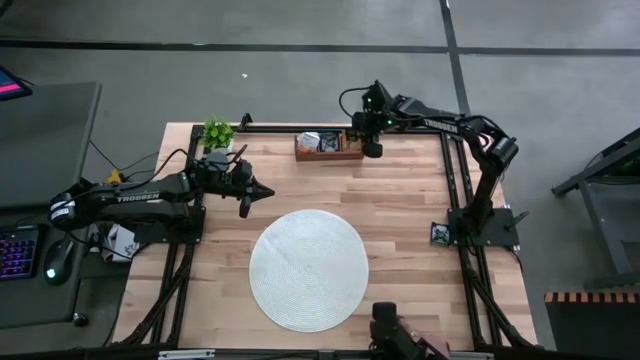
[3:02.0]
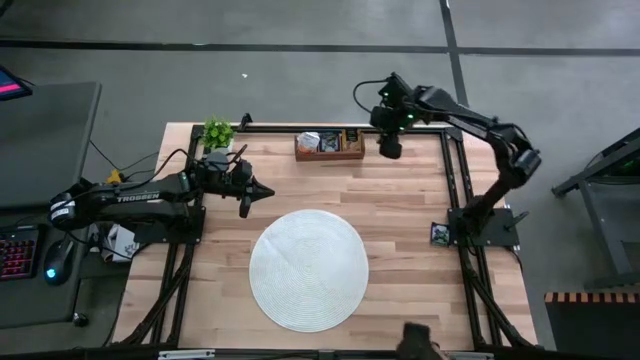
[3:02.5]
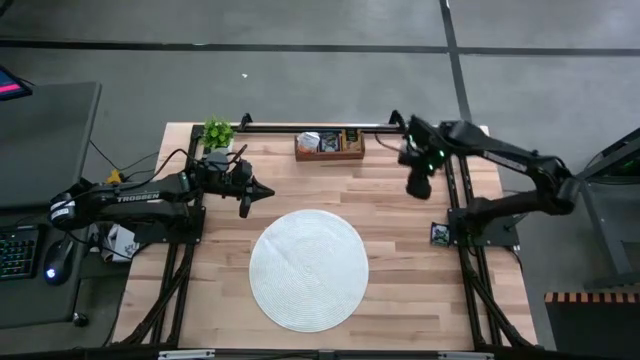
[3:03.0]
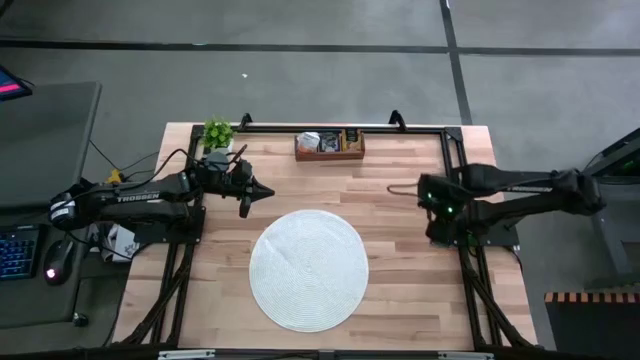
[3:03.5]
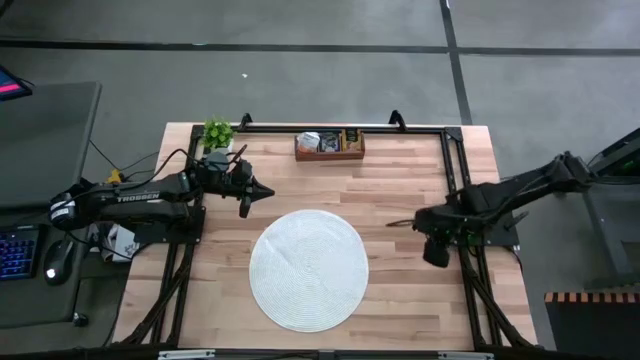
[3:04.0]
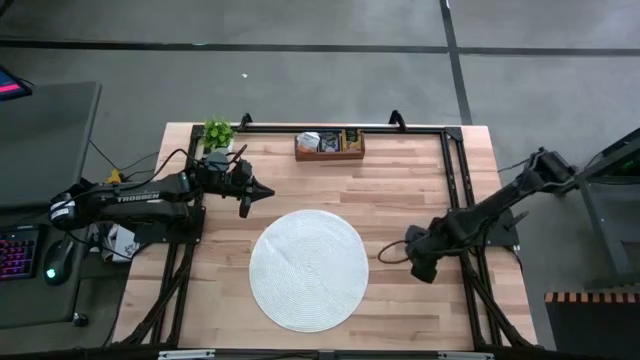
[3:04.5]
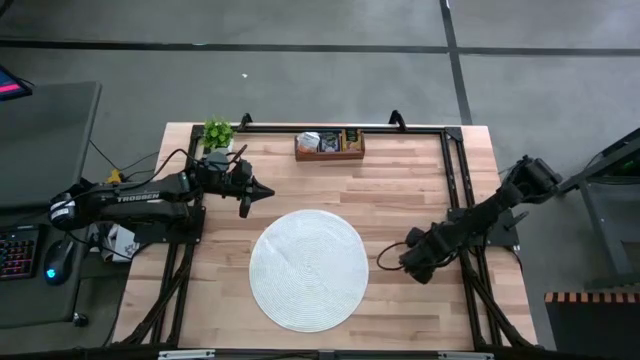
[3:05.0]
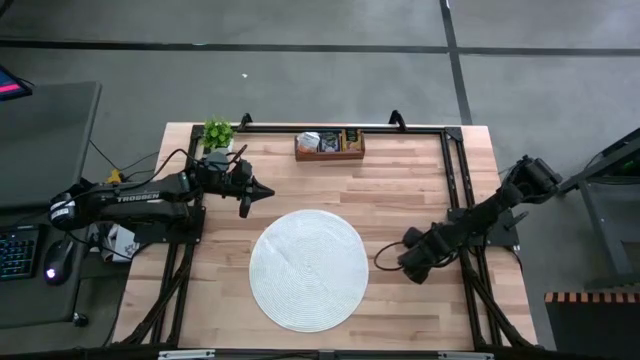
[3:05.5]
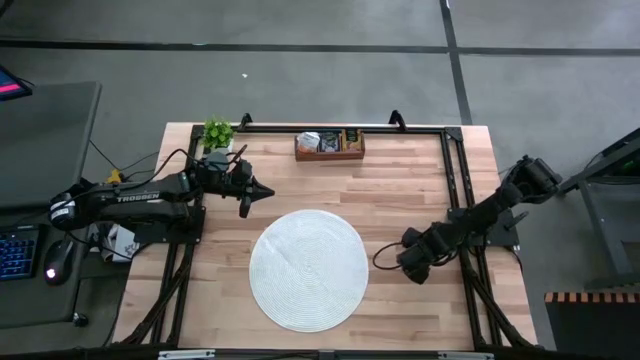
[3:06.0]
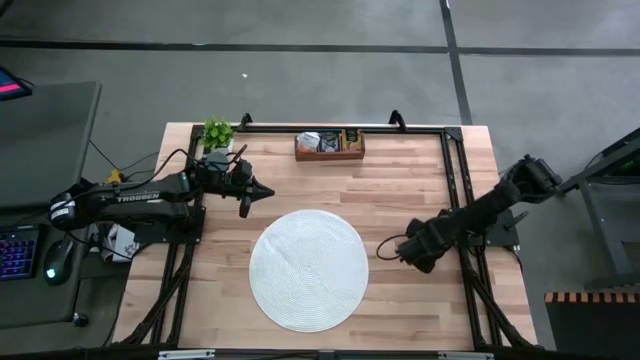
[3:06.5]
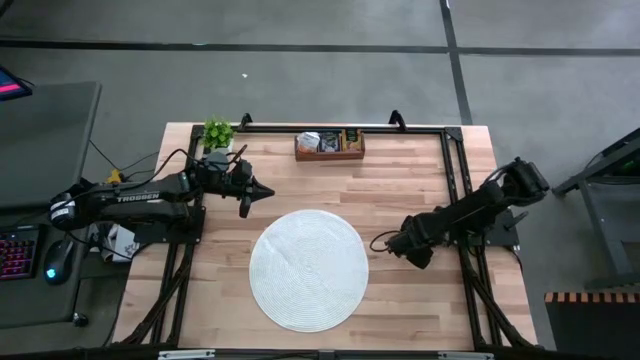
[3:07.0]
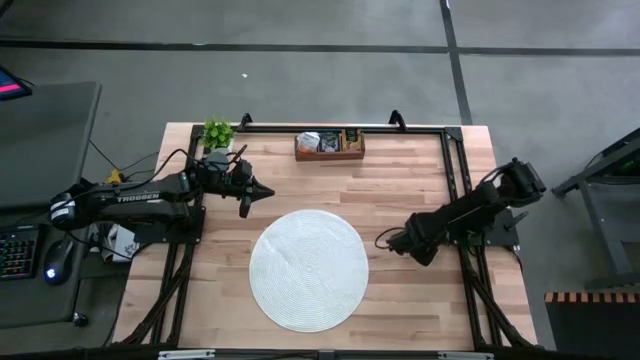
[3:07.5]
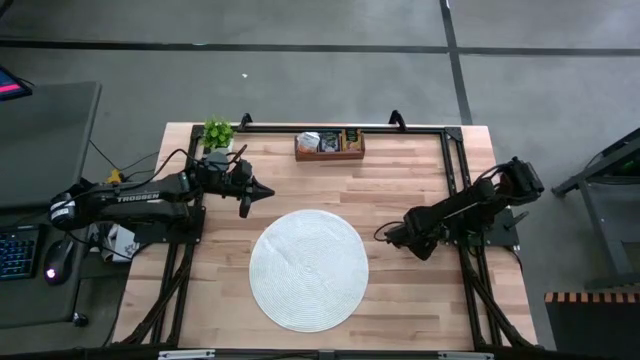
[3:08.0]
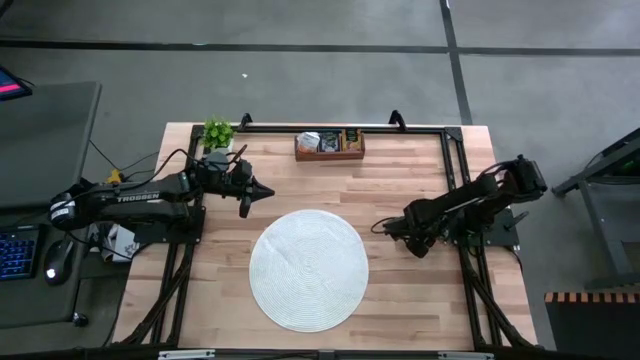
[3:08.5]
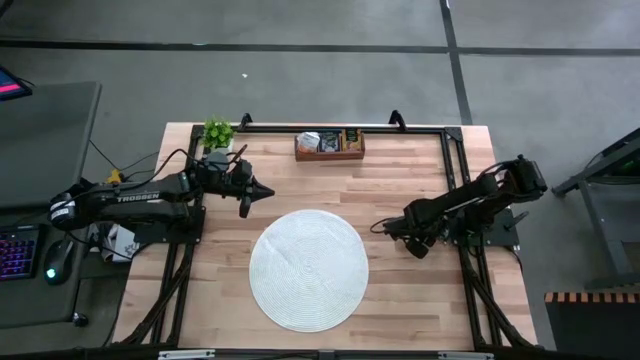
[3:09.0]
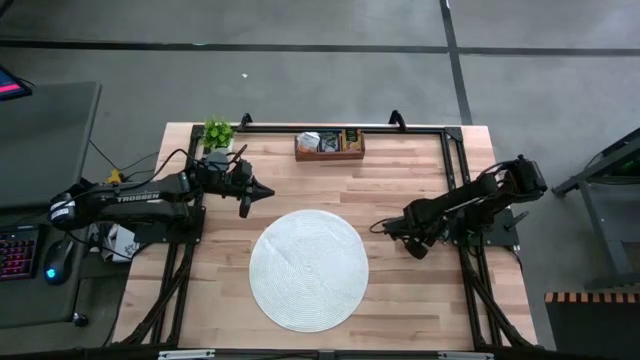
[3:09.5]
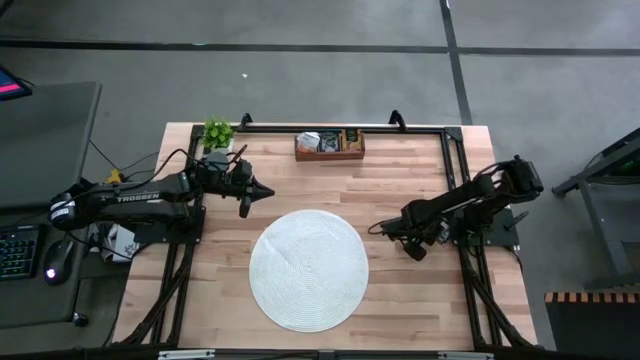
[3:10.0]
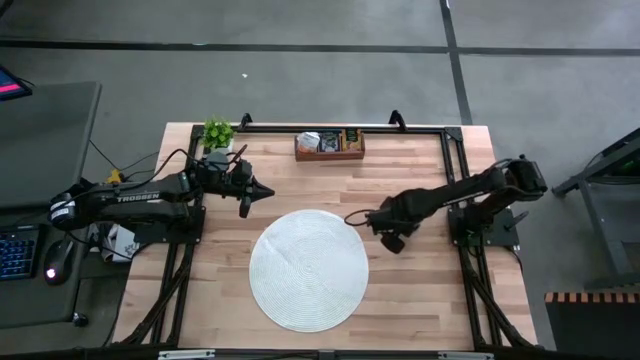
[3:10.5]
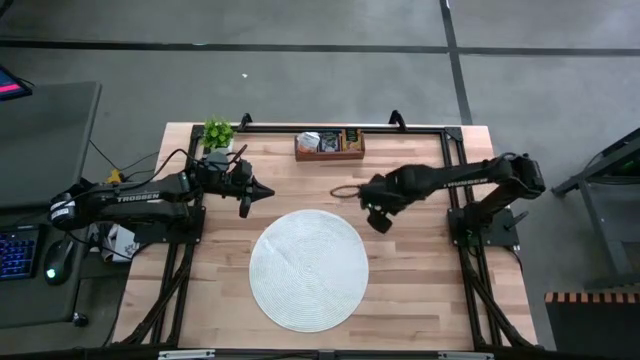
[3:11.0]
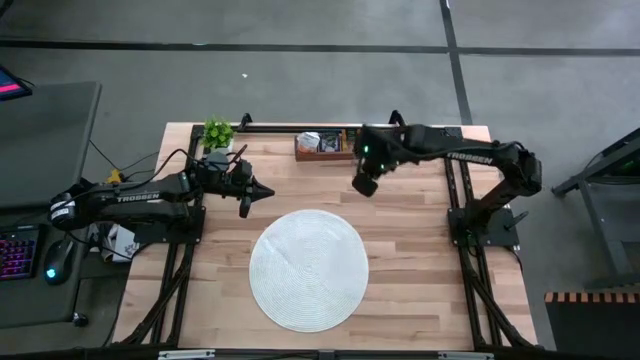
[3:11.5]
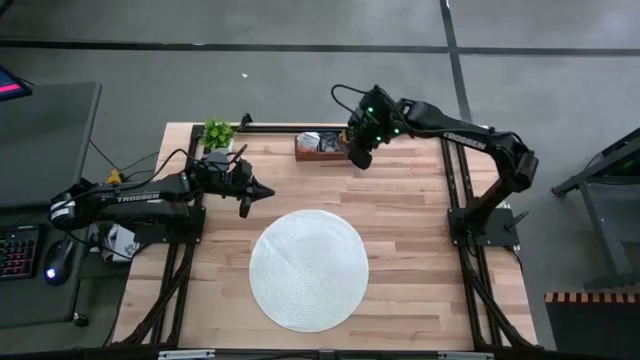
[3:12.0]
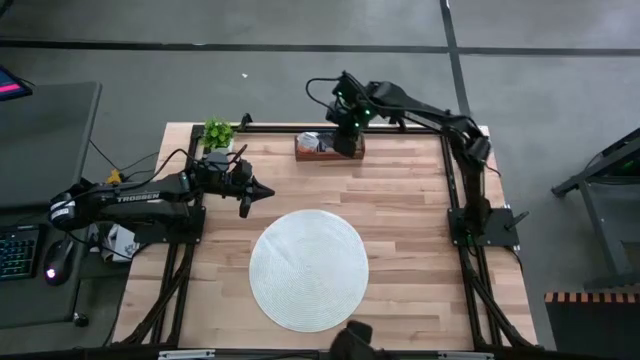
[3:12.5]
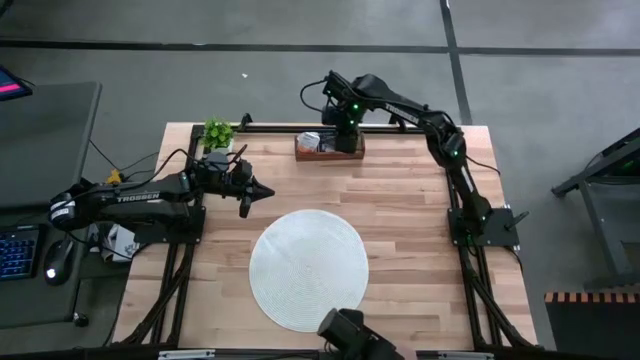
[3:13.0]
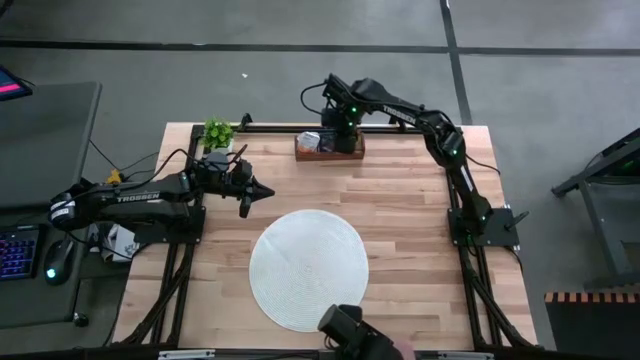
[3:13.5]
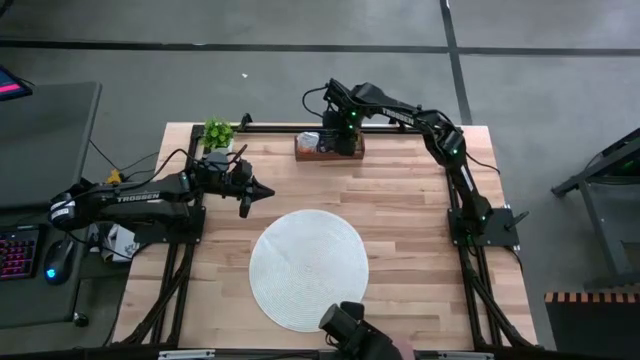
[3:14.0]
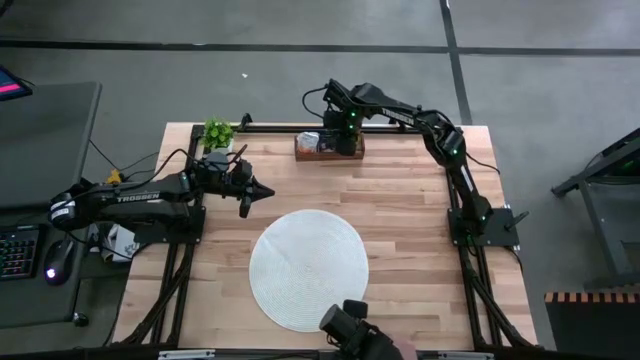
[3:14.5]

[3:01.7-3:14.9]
Task: Pick & Place Tea
Put the blue tea bag into the middle section of the wooden organizer

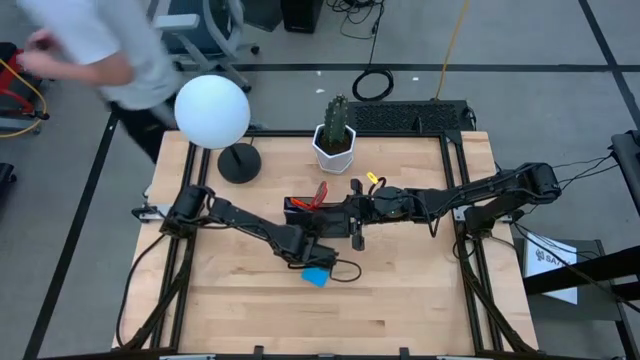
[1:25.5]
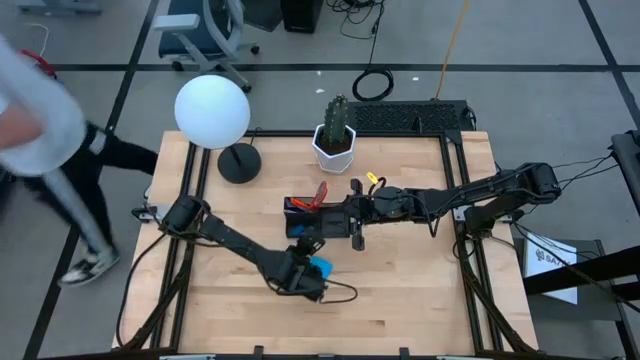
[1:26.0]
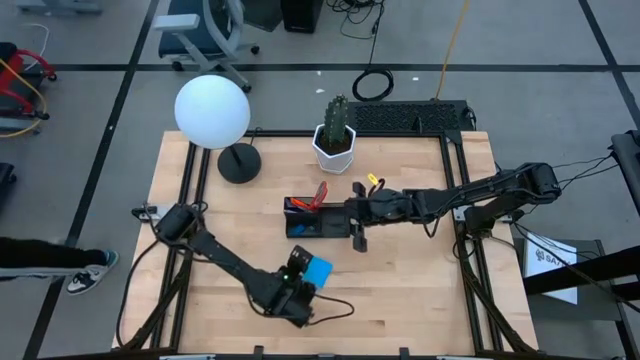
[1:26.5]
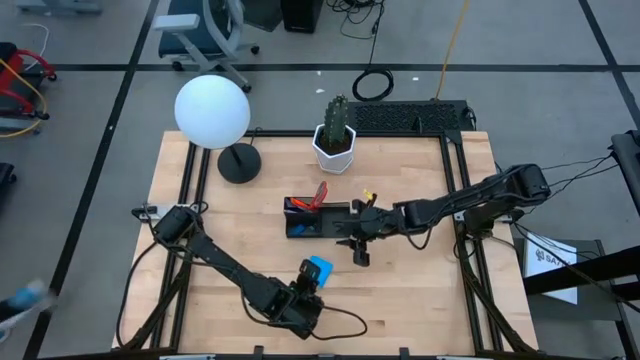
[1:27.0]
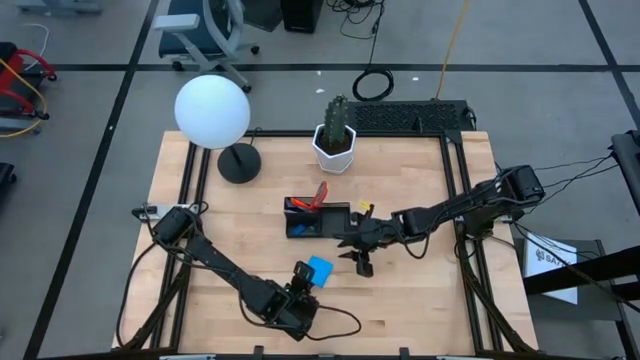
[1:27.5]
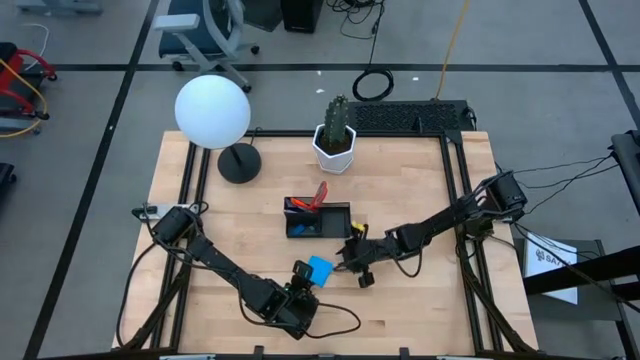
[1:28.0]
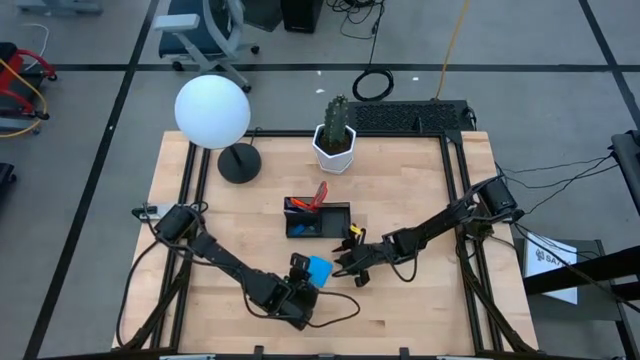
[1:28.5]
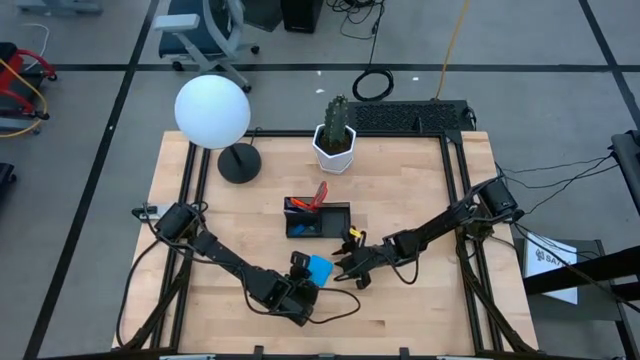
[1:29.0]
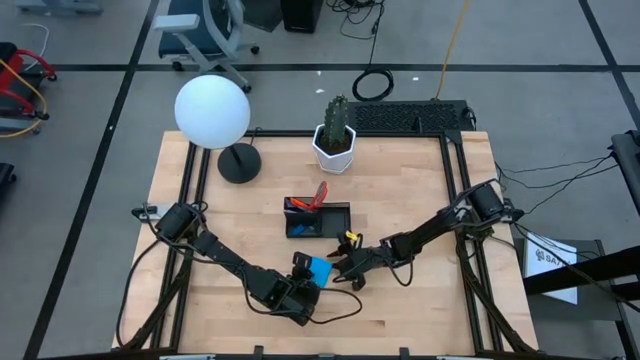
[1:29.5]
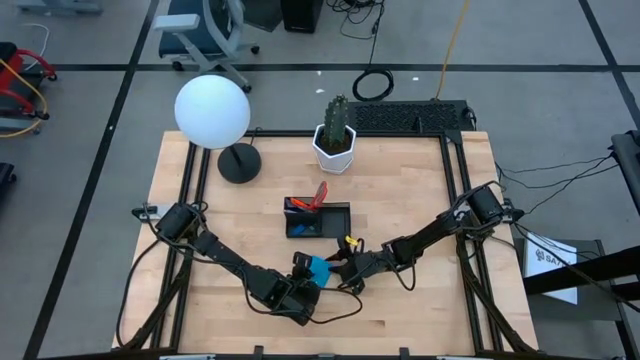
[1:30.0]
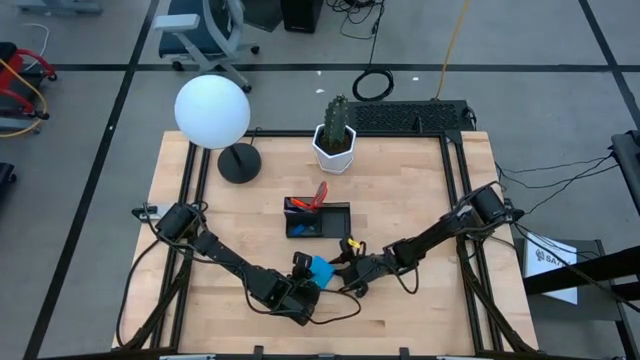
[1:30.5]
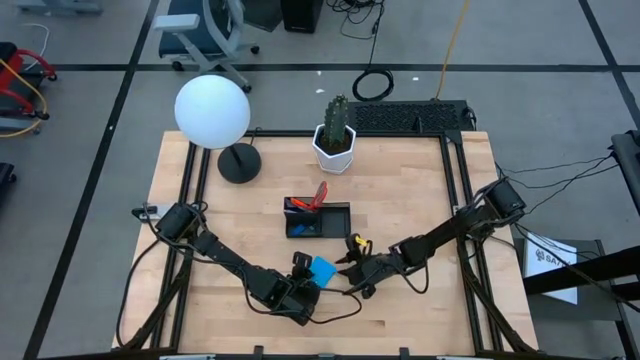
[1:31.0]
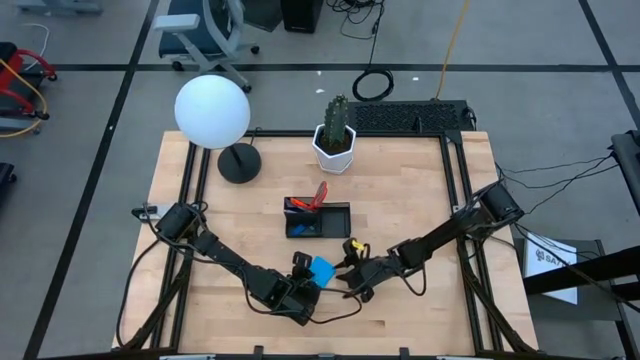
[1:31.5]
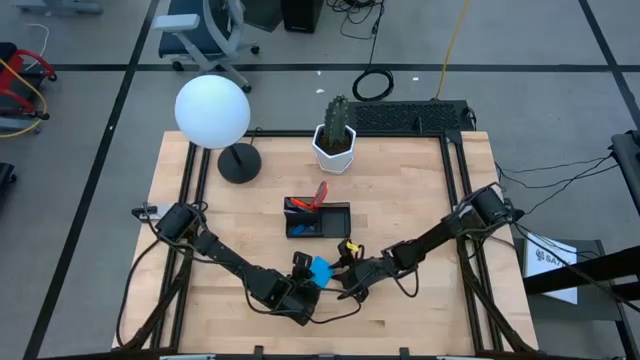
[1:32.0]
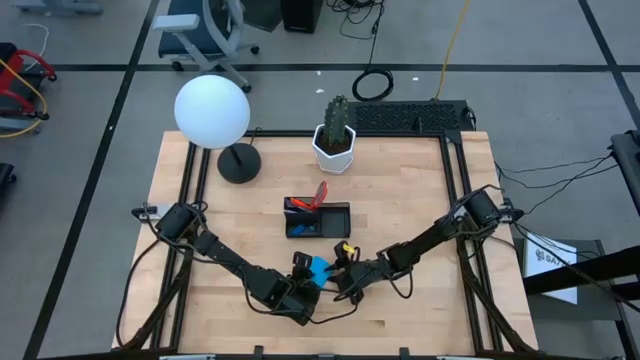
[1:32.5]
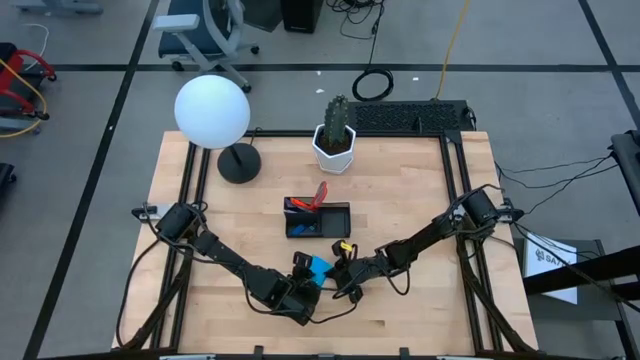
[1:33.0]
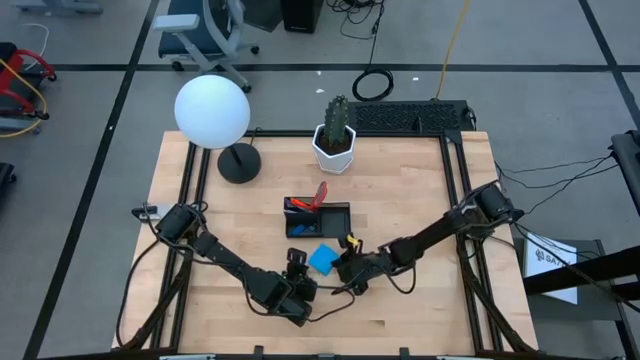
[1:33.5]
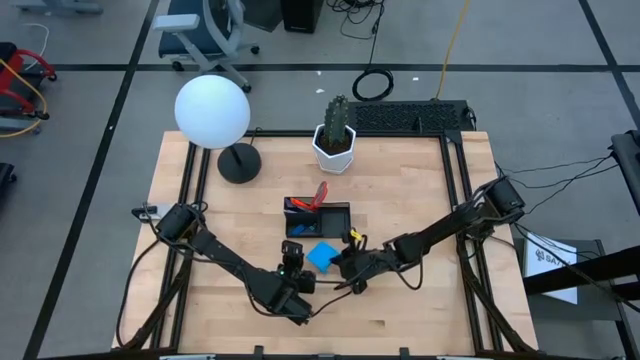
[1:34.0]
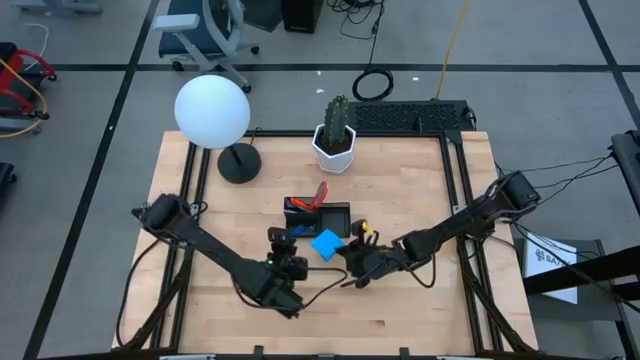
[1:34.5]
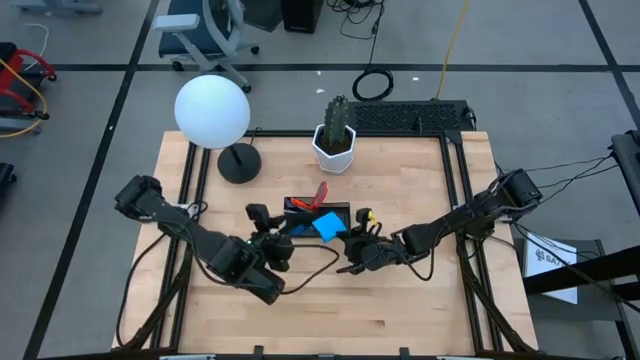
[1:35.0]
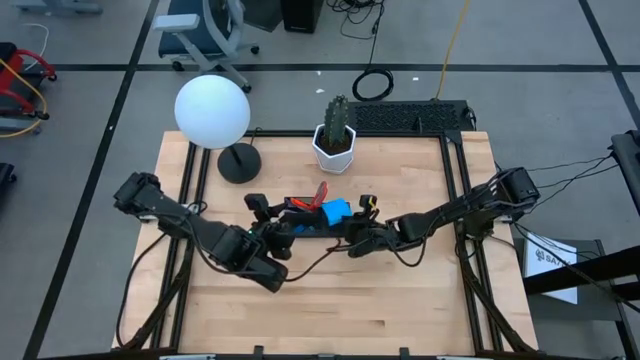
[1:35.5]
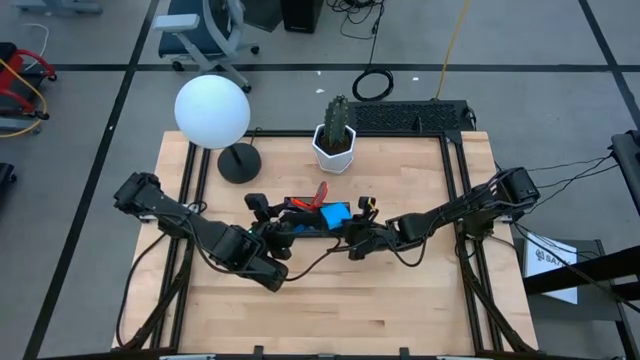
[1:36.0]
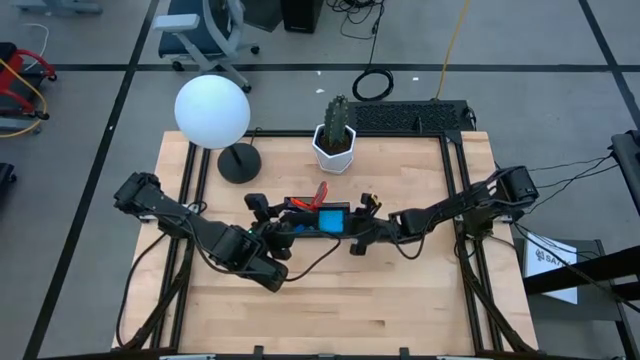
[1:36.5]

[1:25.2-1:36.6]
Task: Pick and place office supplies into organizer
Put the blue sticky notes into the black desk organizer
